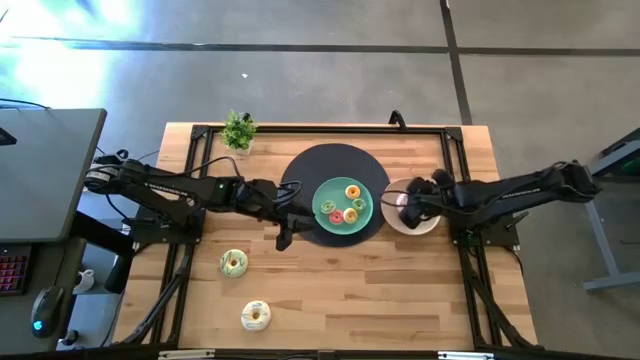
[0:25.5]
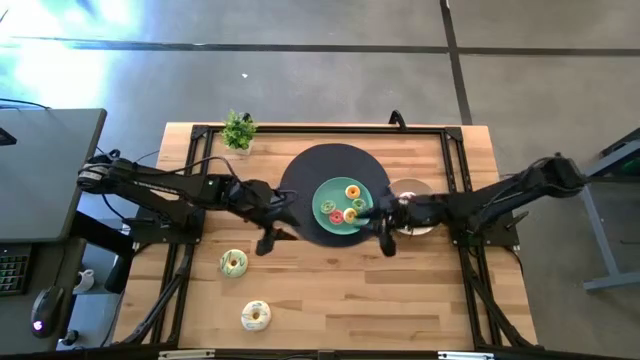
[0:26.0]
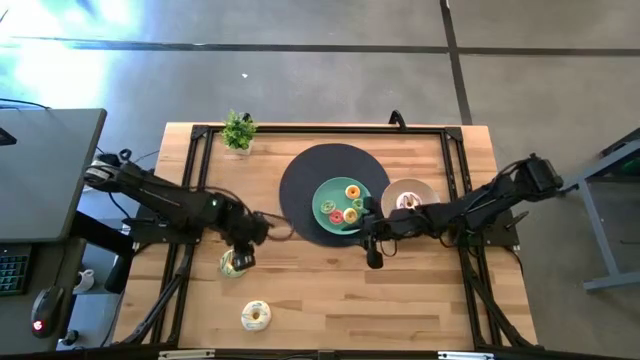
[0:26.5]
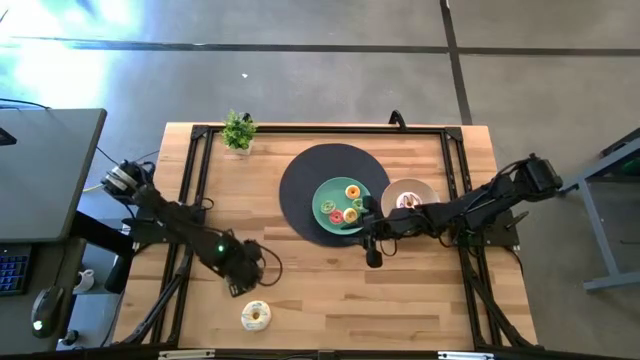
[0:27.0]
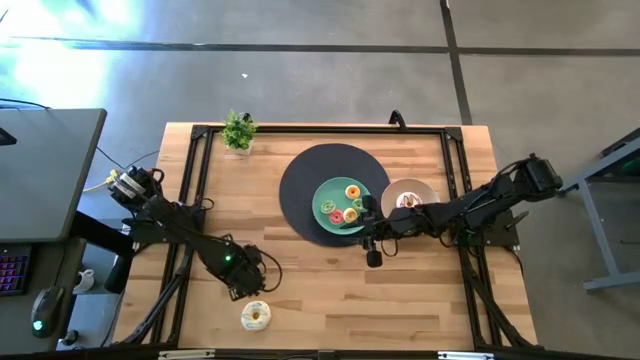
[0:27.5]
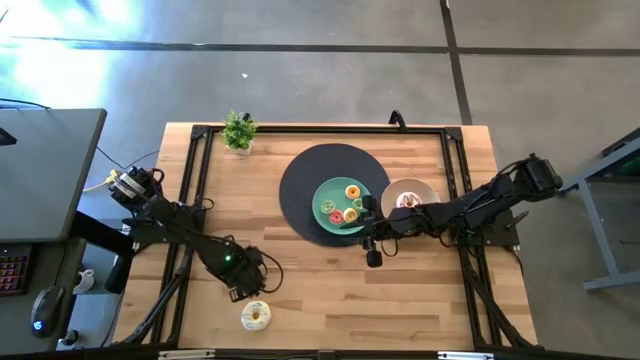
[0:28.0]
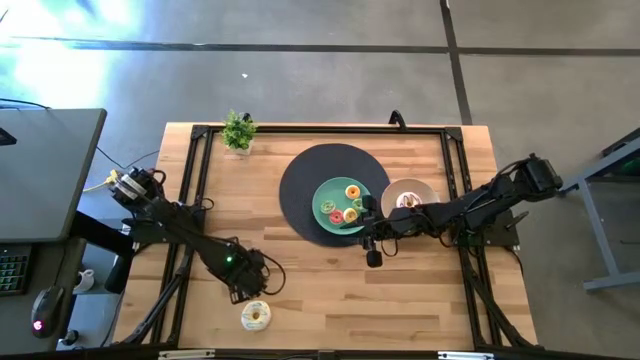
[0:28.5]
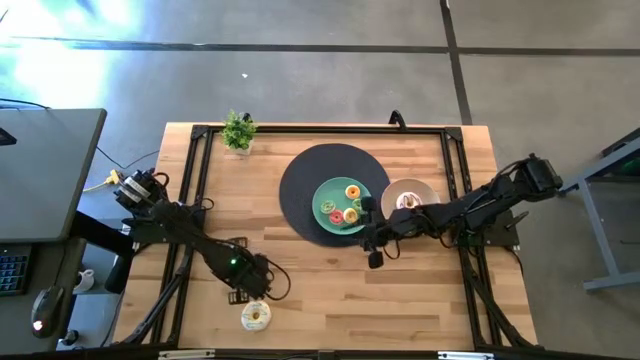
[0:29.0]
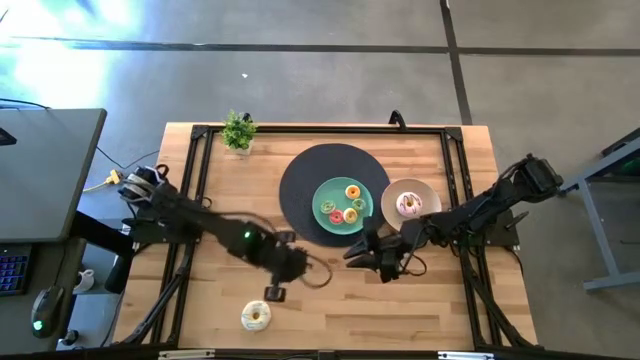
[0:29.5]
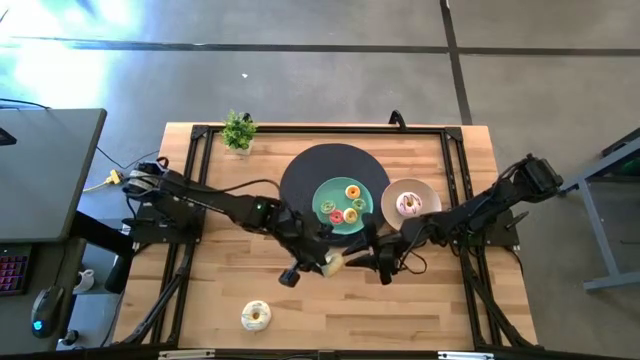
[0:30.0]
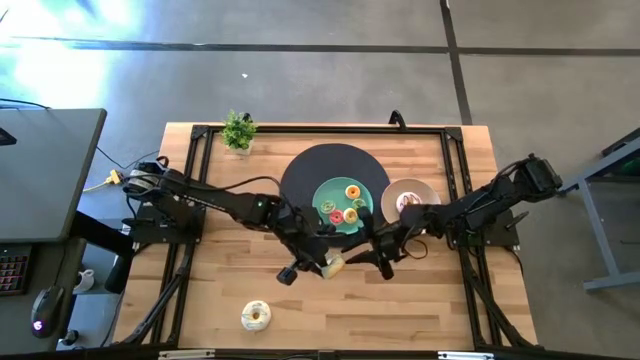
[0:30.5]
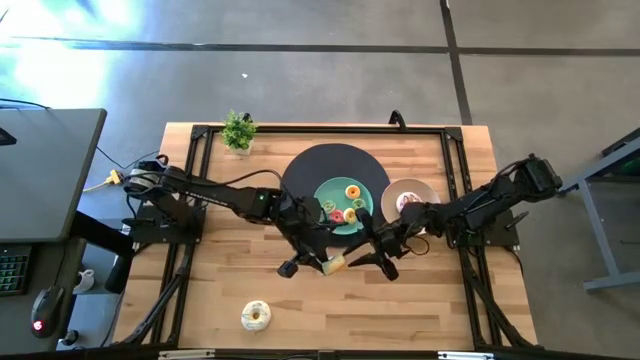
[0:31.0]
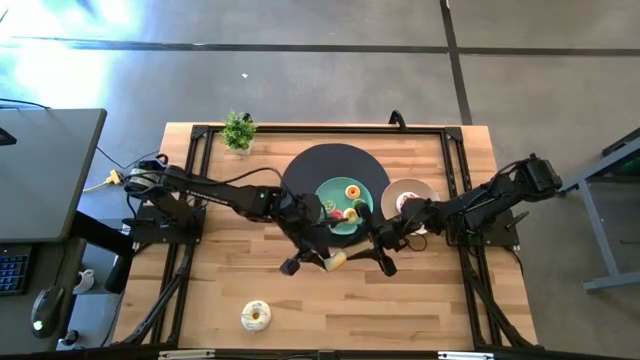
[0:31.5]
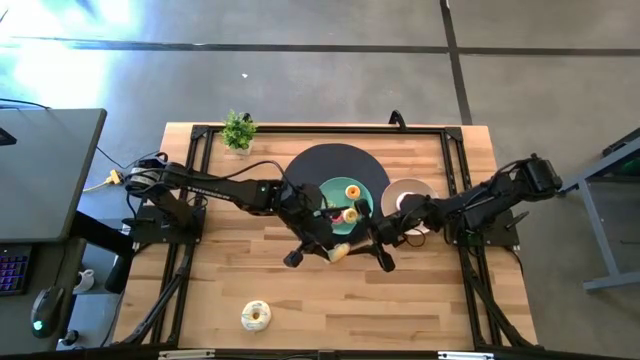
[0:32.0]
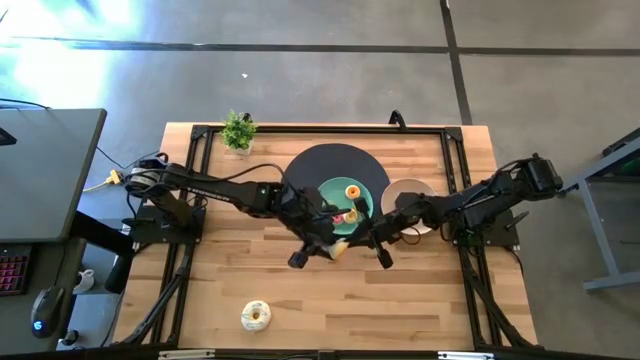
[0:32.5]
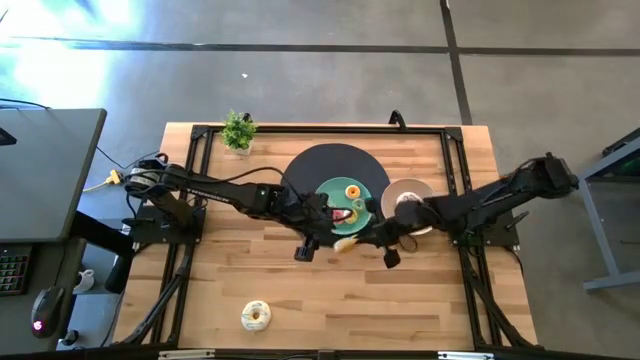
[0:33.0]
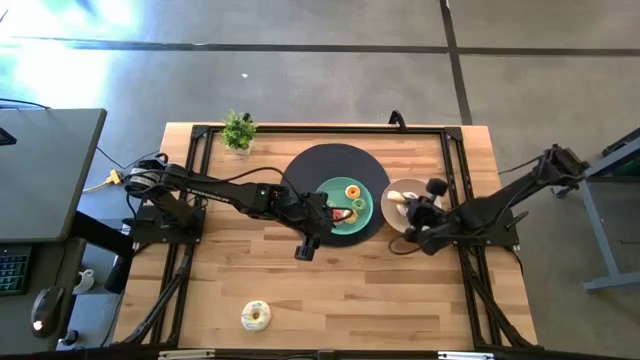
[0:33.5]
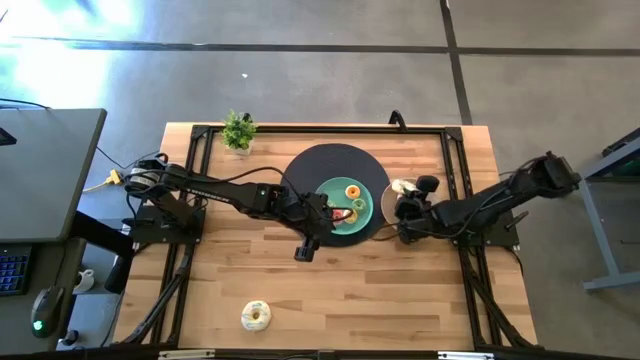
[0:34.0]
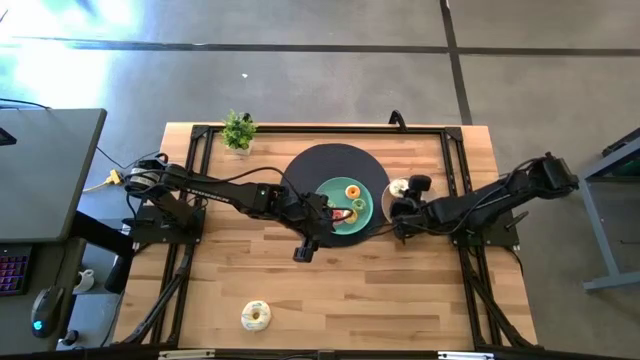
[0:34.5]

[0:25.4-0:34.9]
Task: Pick & Place donuts
Put the blue donut into the light brown plate

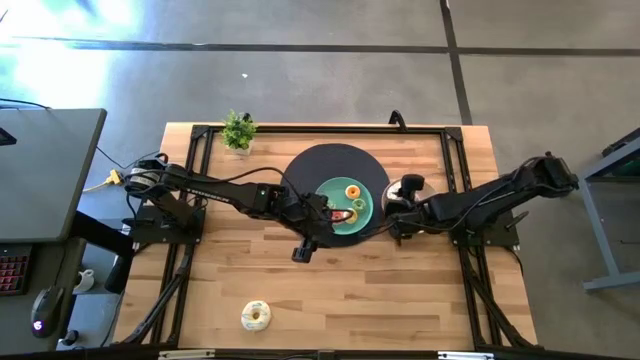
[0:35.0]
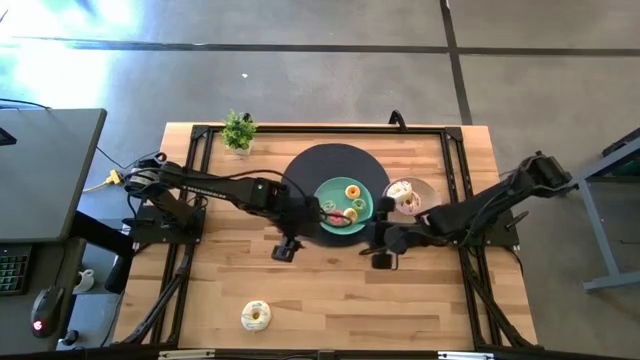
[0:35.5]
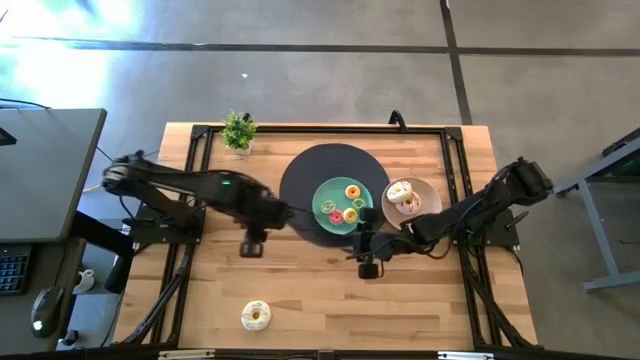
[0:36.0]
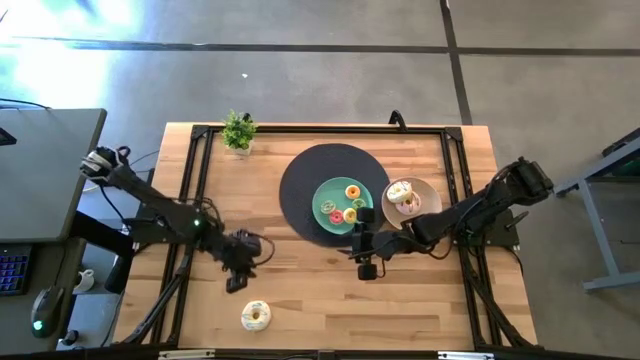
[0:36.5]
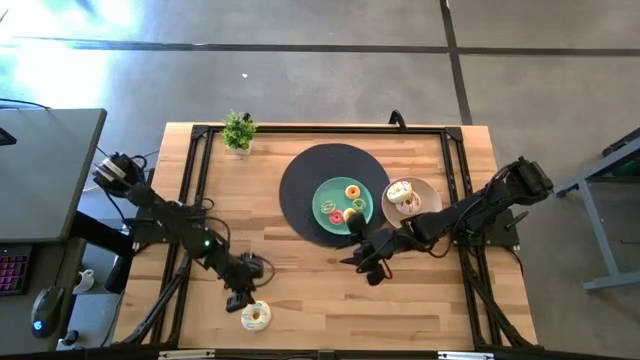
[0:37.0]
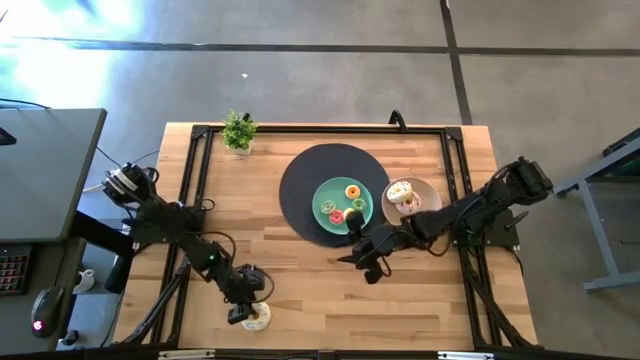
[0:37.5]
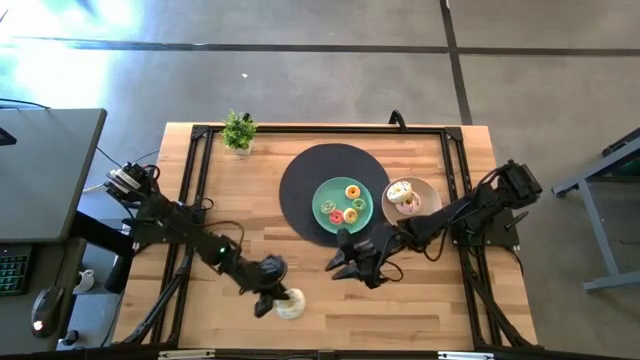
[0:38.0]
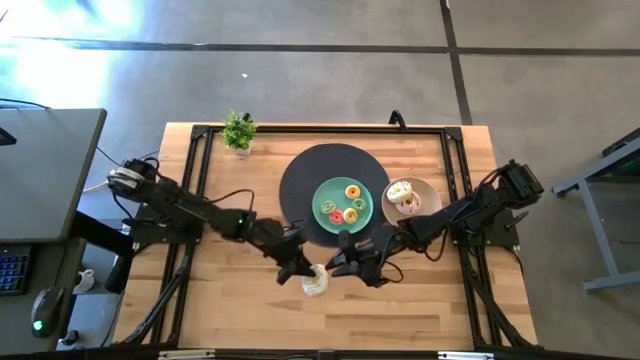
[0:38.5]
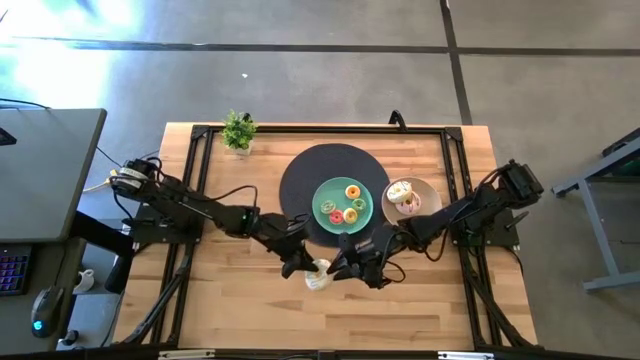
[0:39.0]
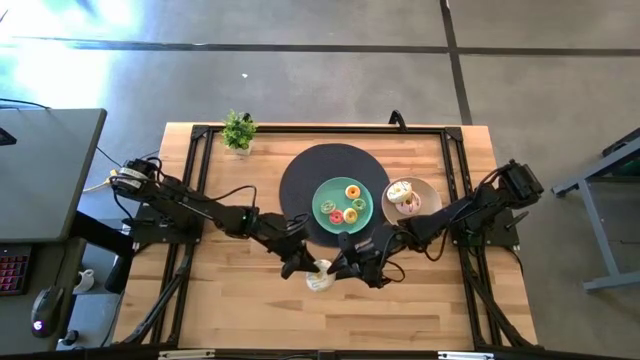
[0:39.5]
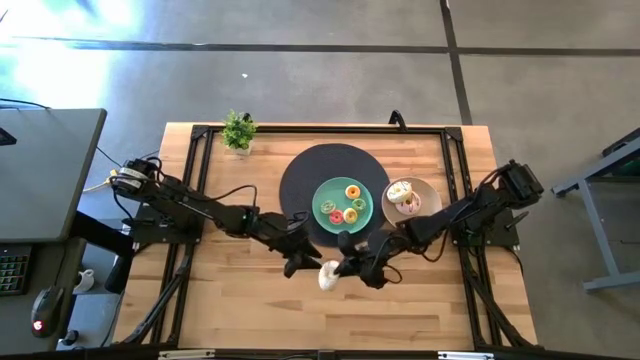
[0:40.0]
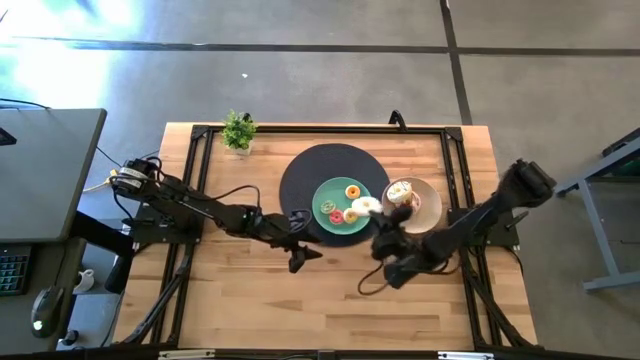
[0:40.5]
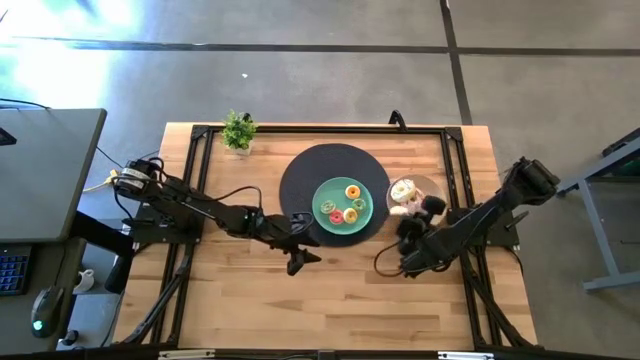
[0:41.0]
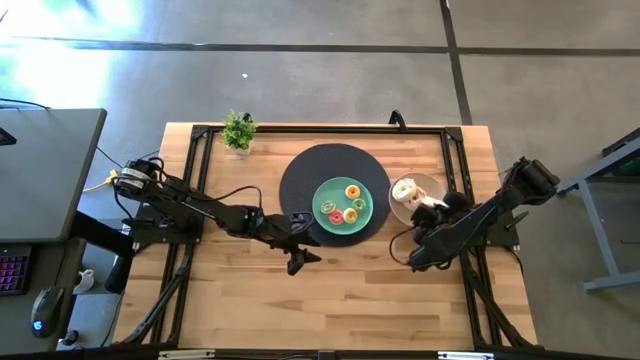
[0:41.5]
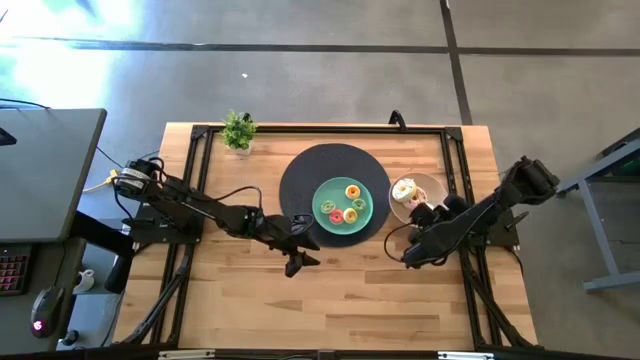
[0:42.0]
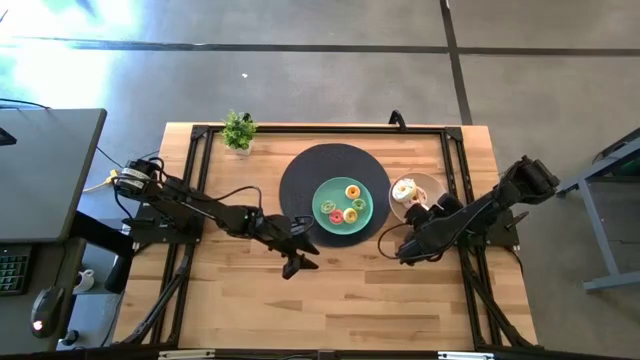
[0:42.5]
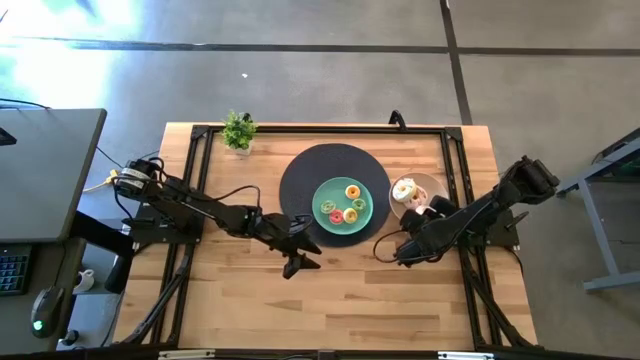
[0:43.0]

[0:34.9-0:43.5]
Put the big white donut into the light brown plate

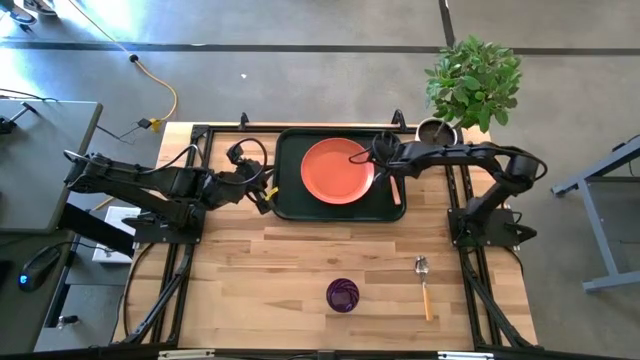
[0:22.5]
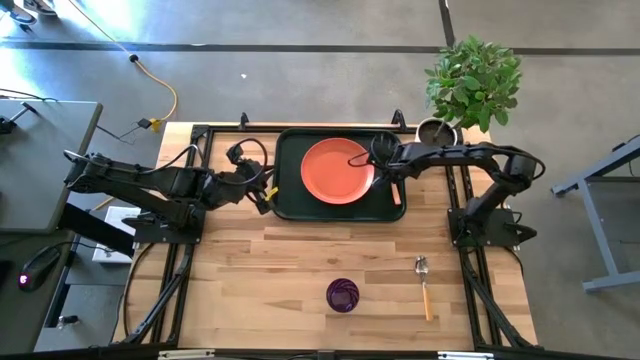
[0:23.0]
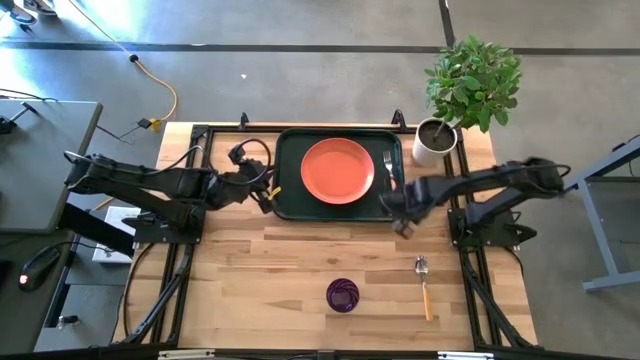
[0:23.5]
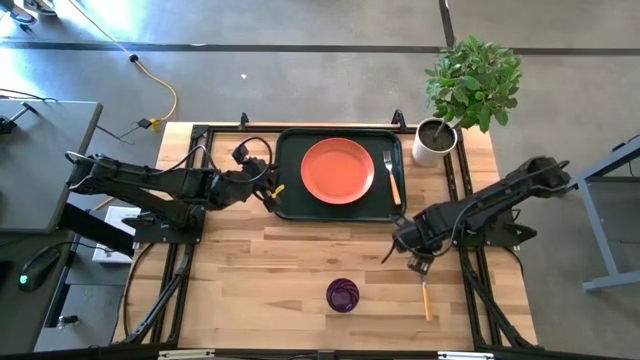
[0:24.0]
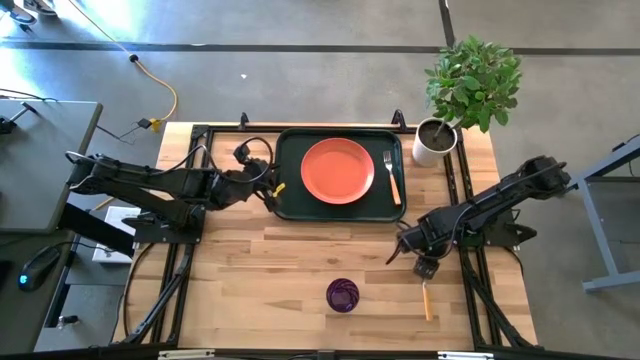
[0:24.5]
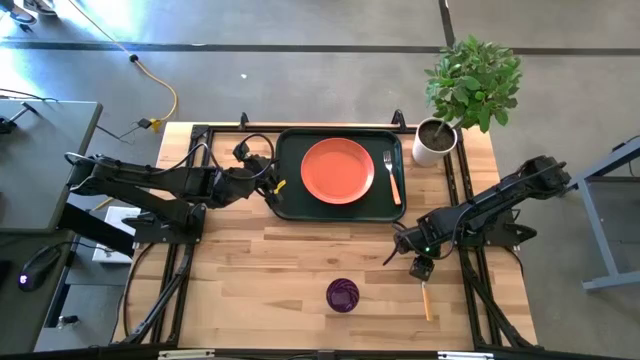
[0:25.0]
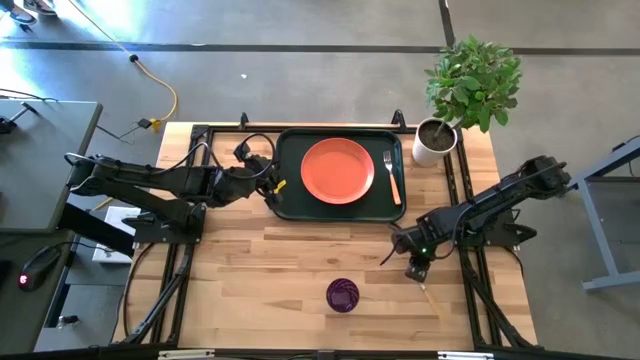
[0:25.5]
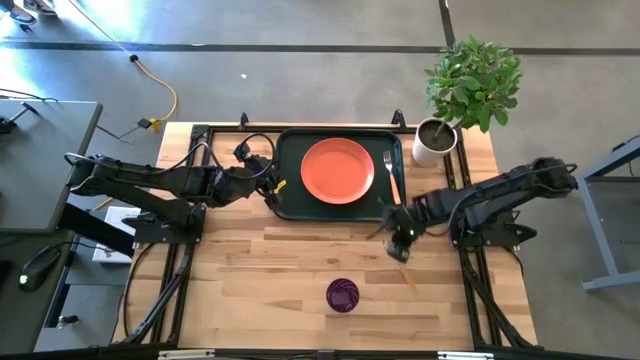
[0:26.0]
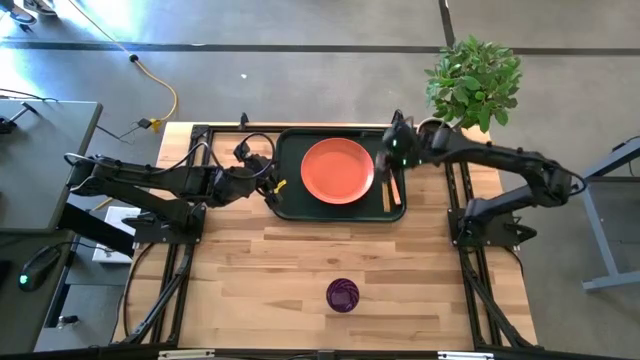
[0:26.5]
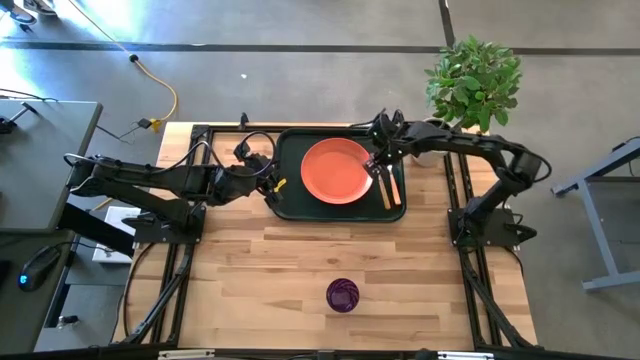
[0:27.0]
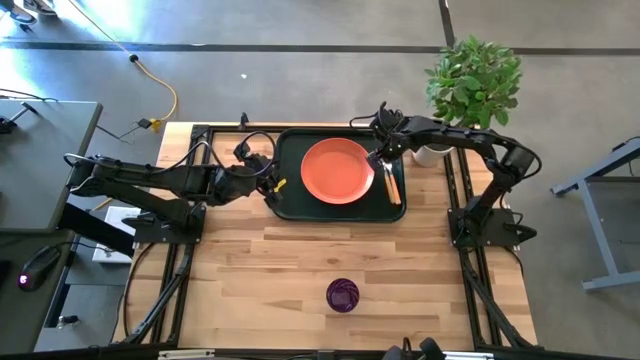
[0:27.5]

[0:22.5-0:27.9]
Task: Pick and place plate/cup/fork/spoon on tray
Put the yellow spoon on the dark green tray to the left of the yellow fork
